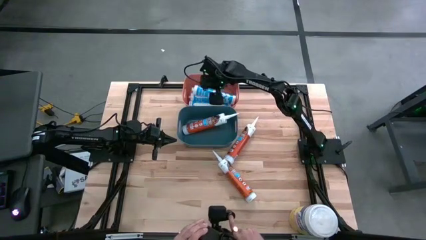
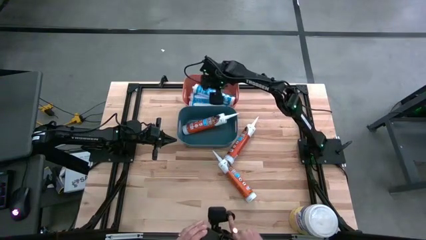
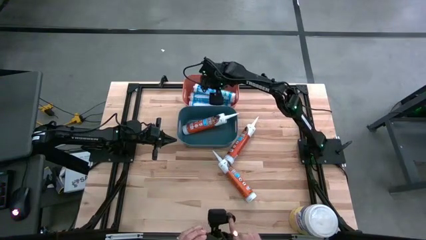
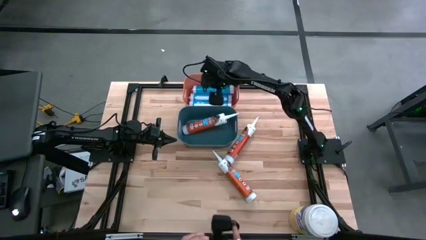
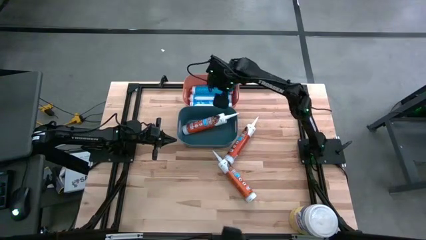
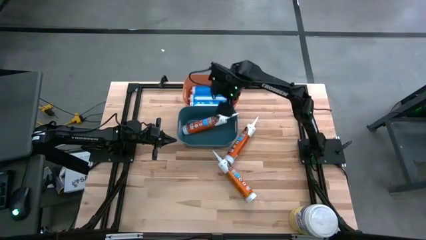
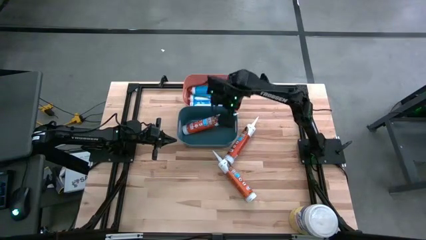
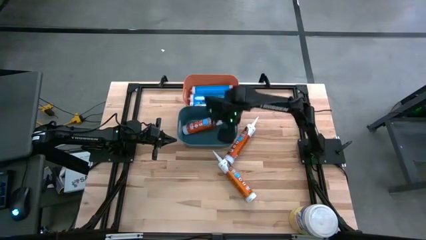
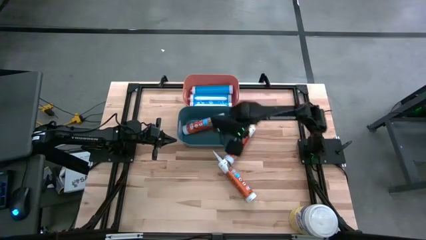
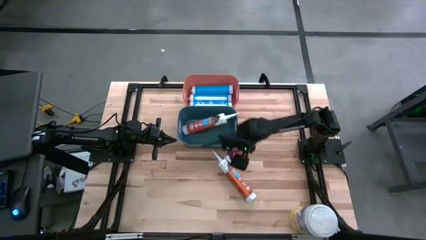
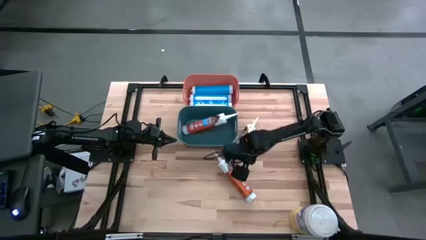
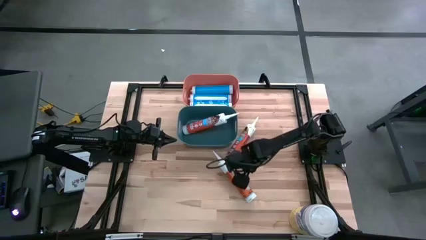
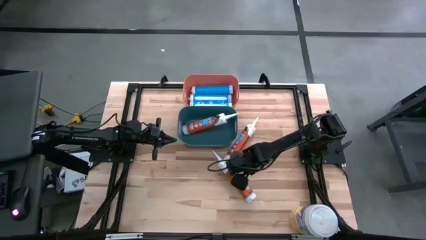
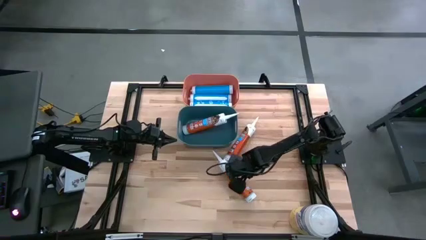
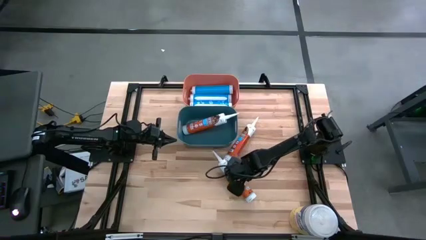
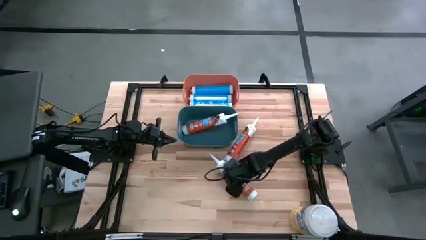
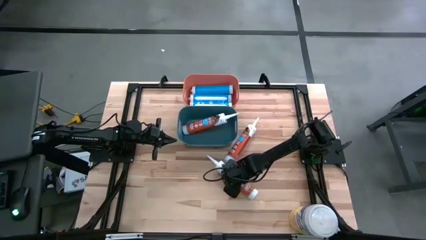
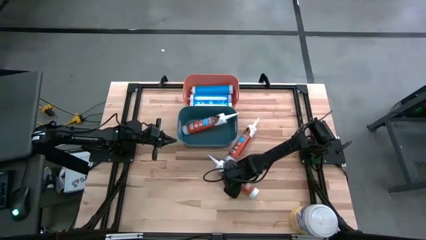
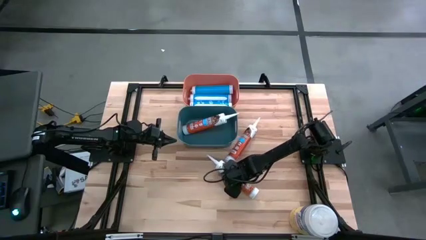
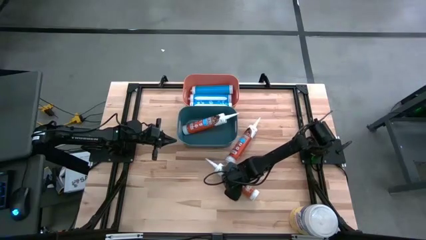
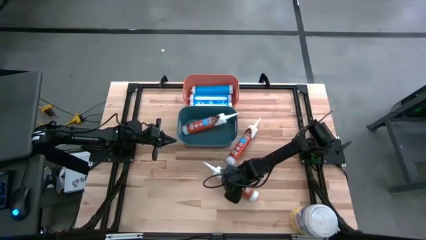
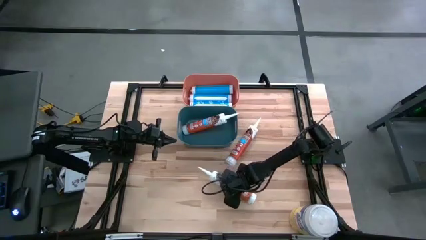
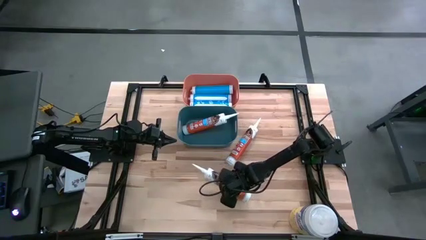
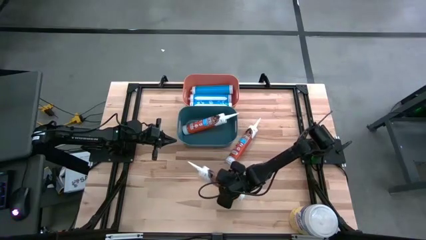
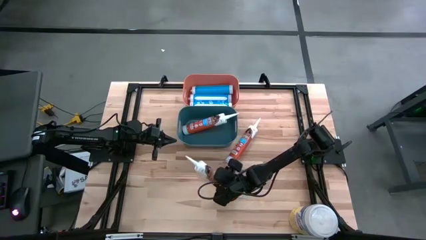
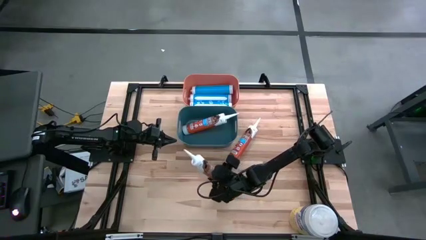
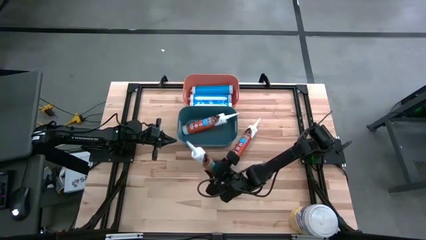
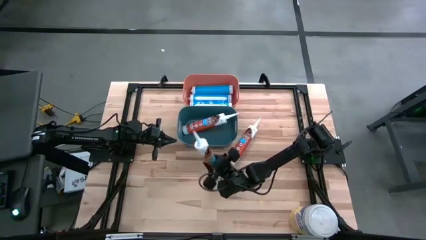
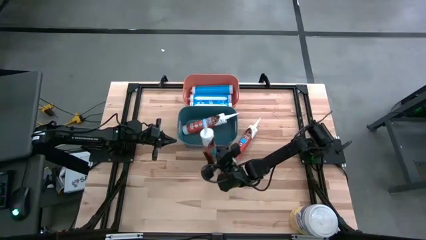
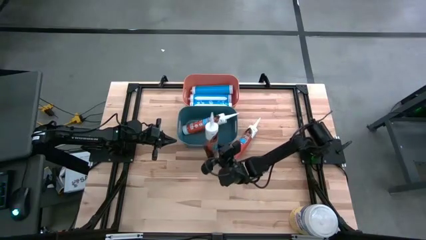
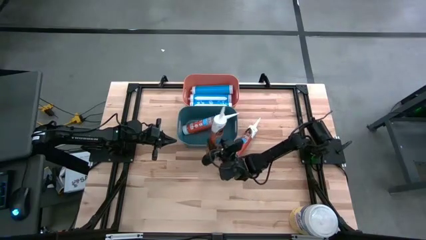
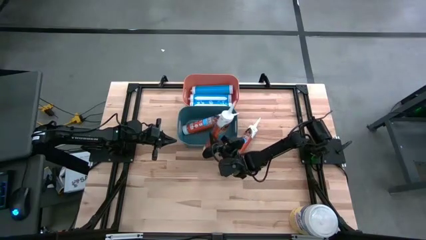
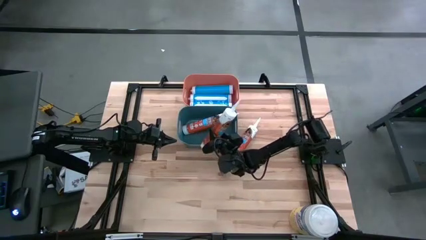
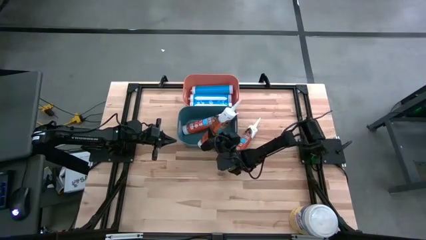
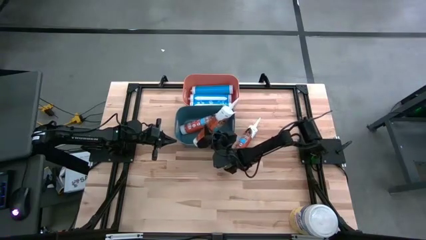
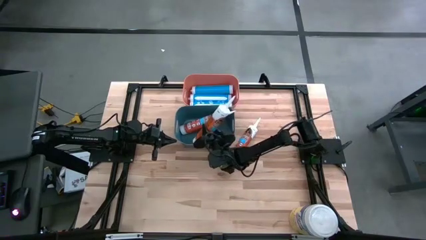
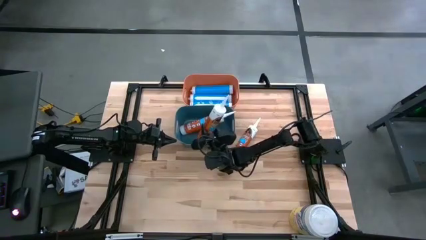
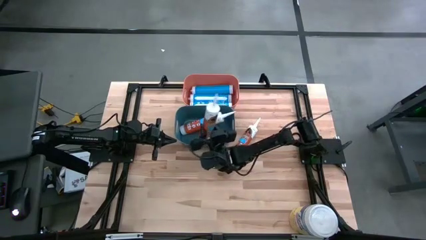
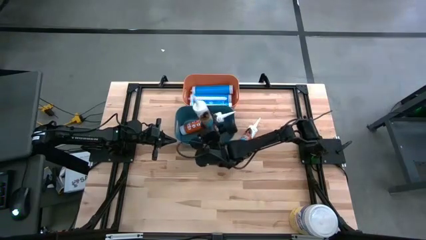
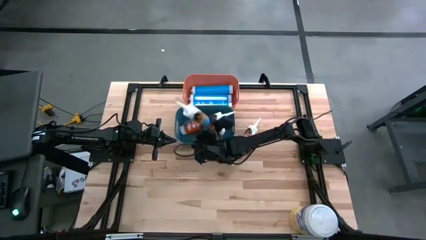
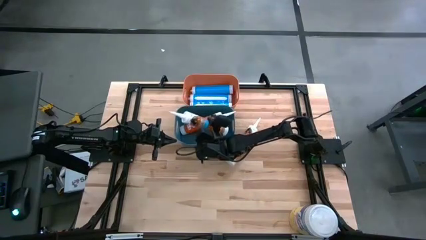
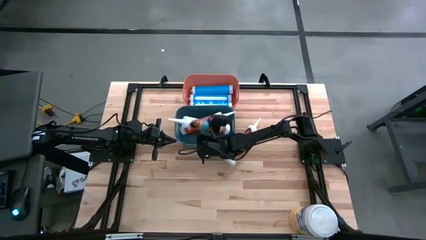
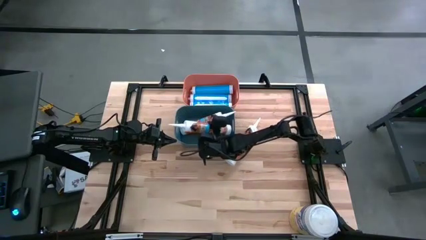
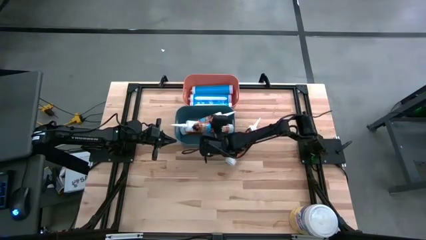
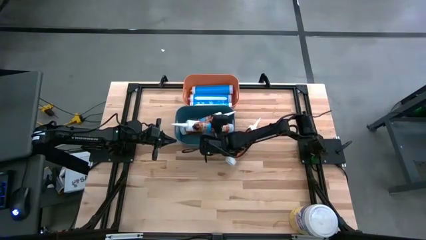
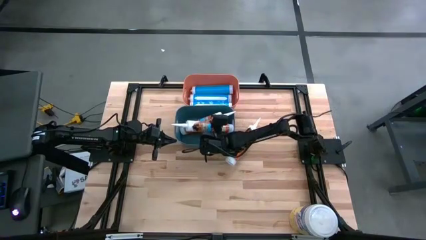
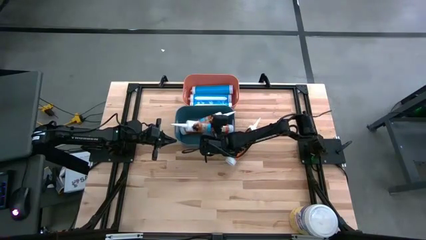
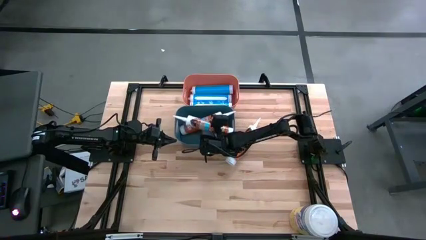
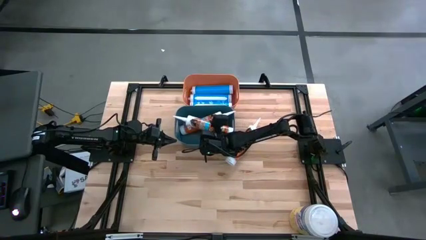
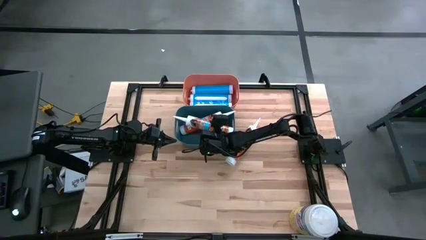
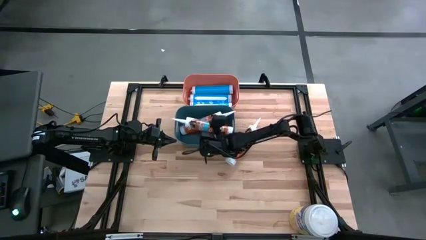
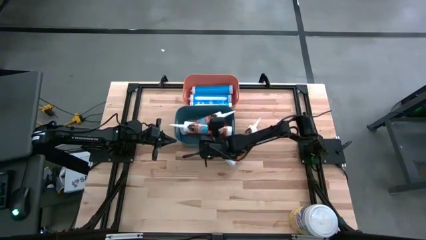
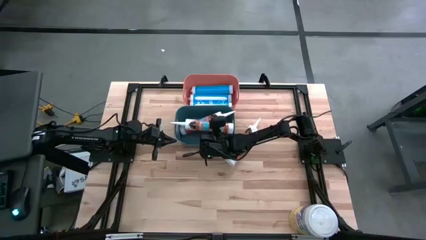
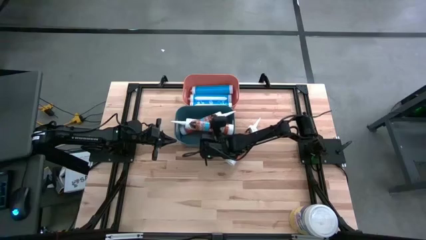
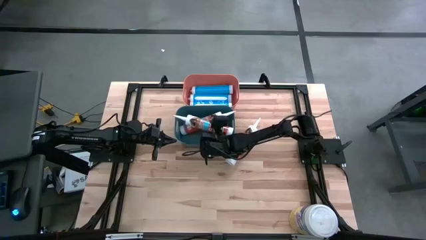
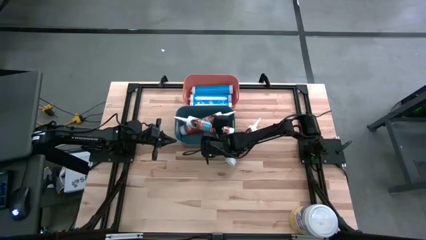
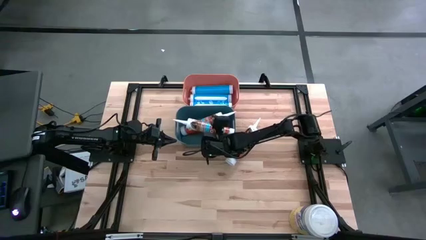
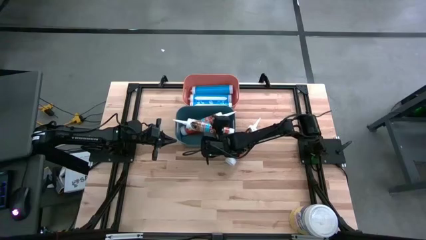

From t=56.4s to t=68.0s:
Task: Pick & place silicon tubes, Sealant and Lysol wipes
Put the bottom orange sealant into the blue bin

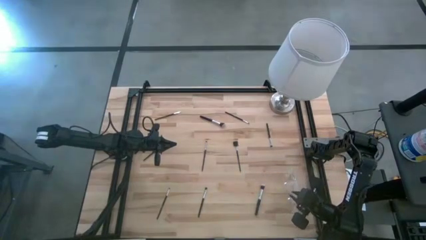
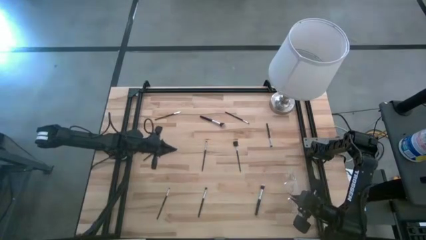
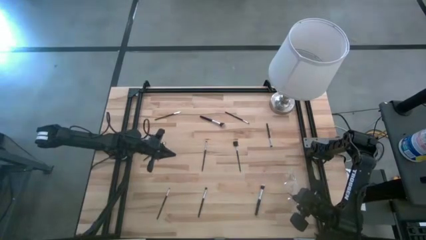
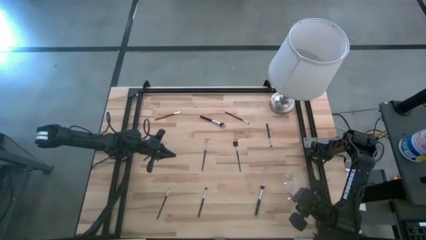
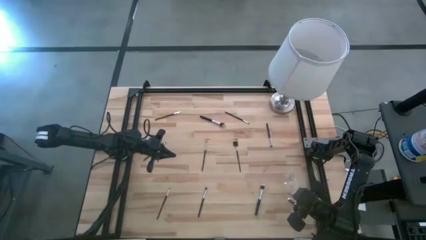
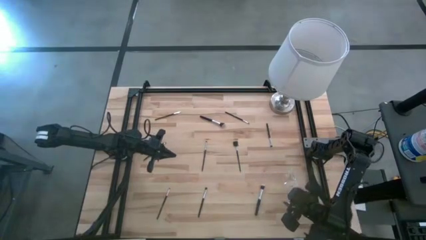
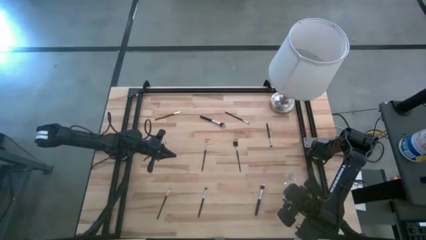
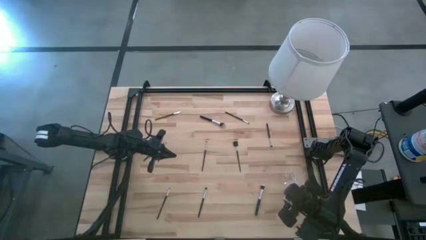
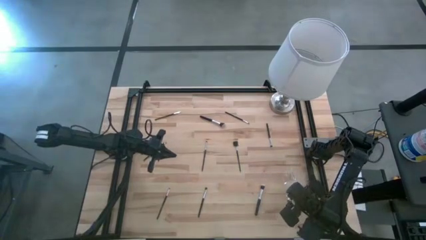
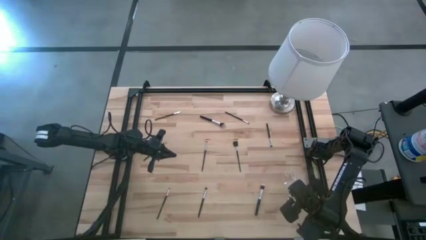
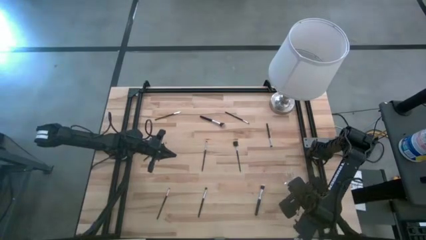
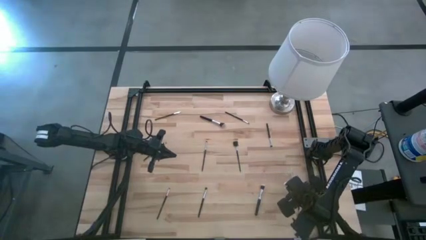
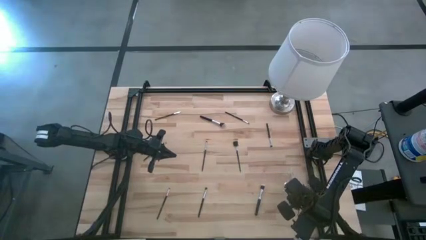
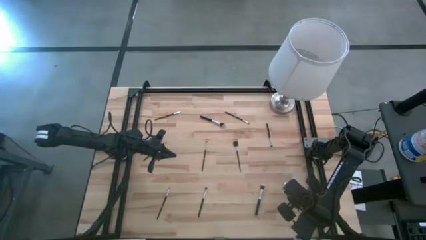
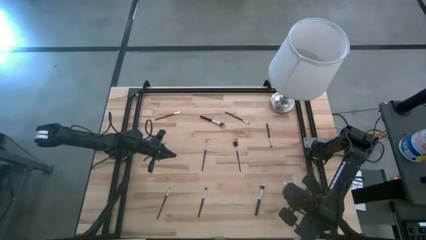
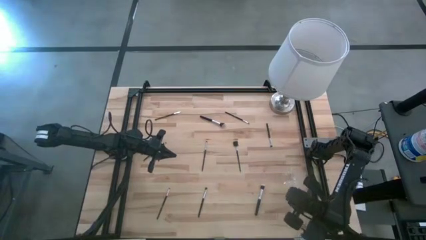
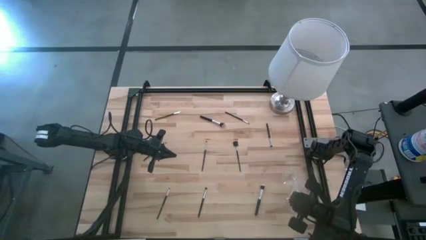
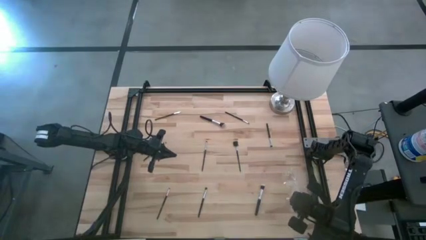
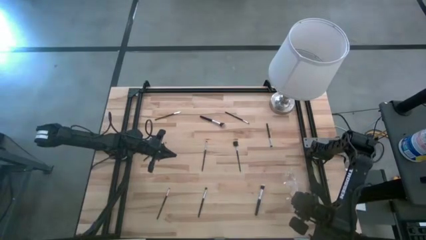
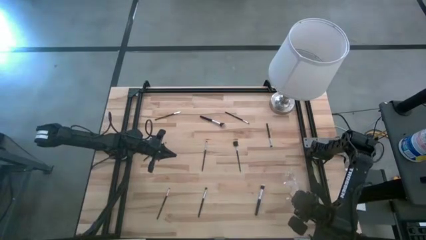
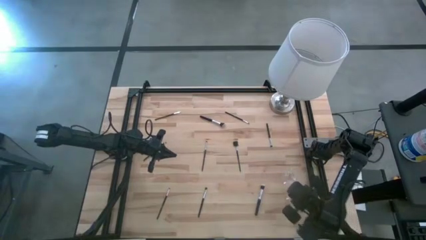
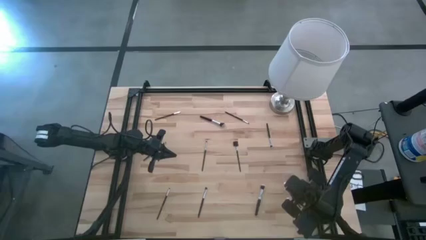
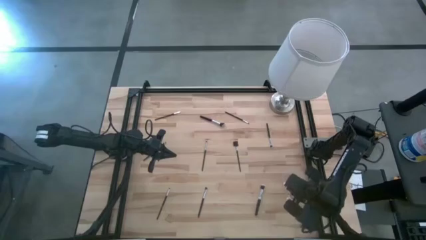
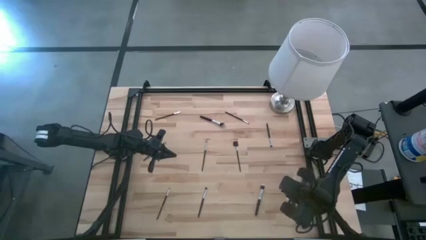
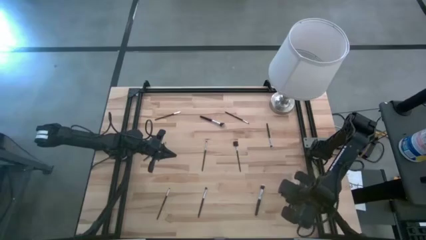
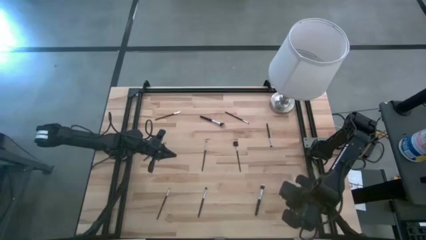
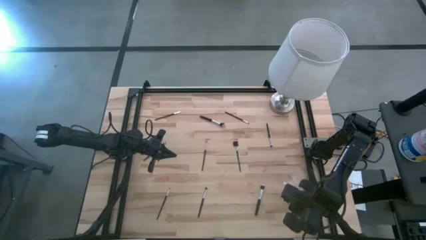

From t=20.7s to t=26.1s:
Task: Put items in baskets/containers
Adjust the angled brush
